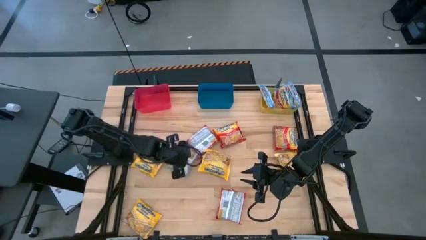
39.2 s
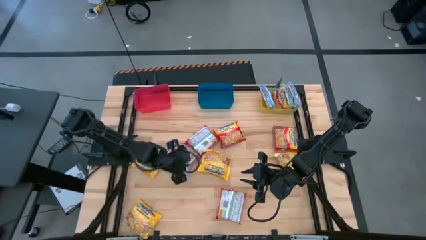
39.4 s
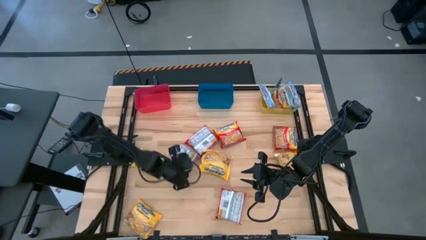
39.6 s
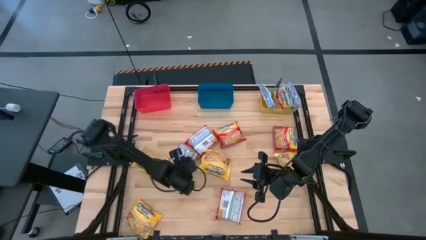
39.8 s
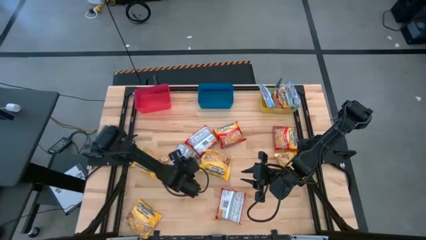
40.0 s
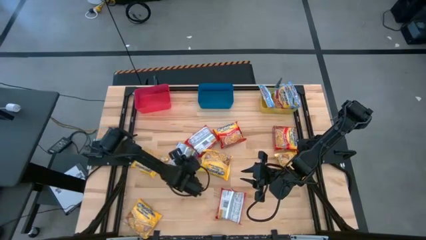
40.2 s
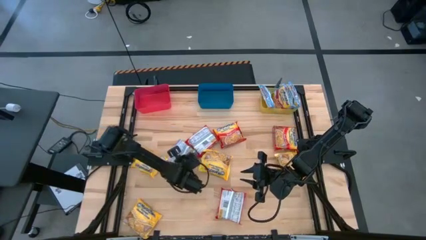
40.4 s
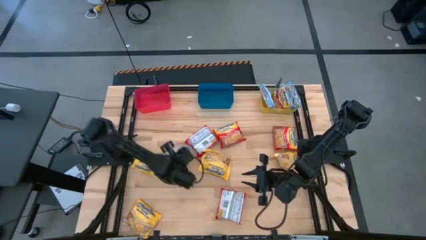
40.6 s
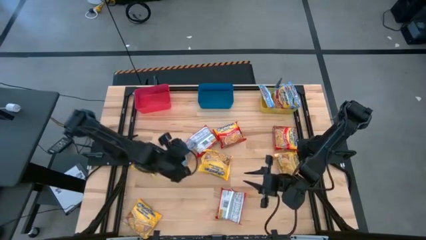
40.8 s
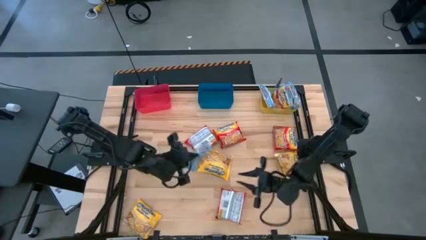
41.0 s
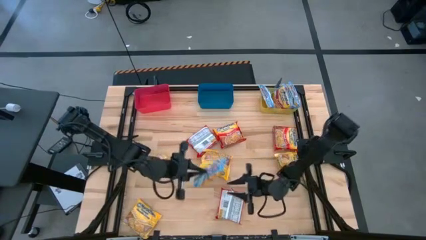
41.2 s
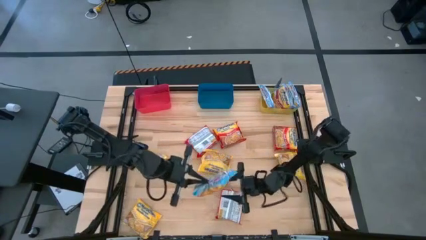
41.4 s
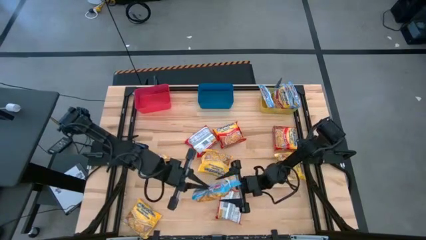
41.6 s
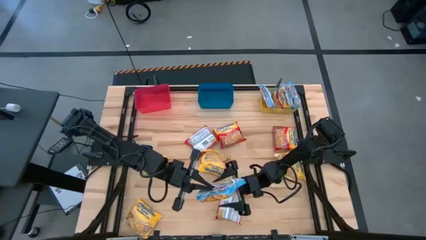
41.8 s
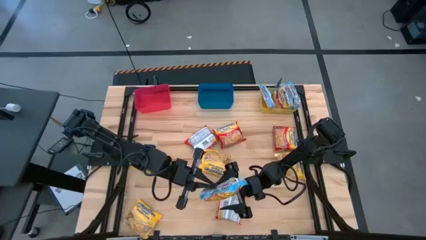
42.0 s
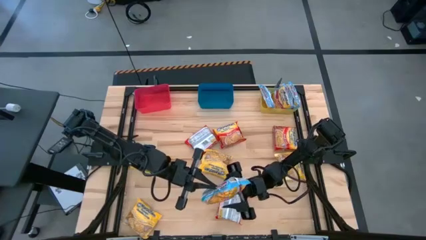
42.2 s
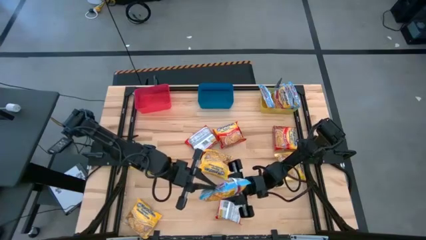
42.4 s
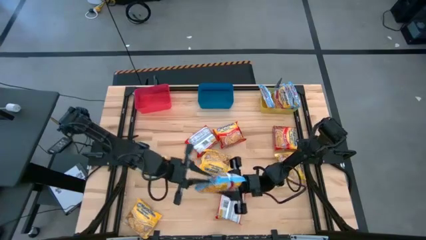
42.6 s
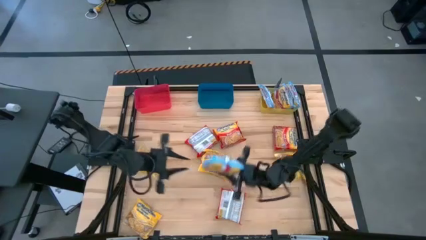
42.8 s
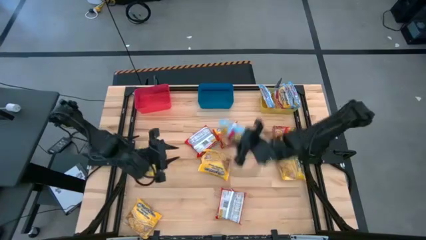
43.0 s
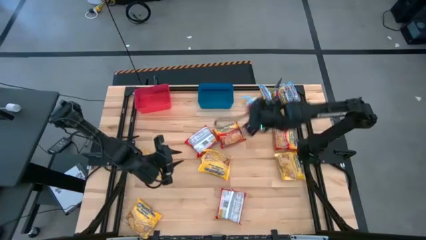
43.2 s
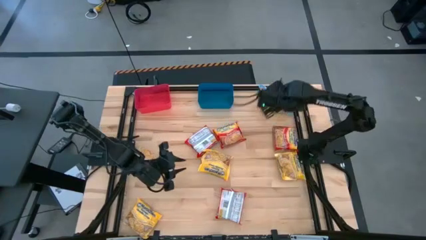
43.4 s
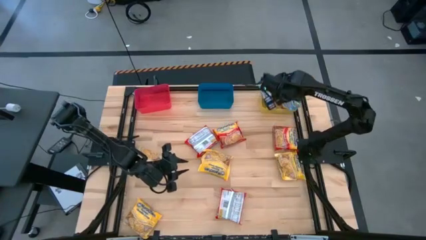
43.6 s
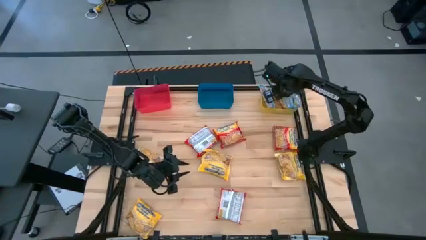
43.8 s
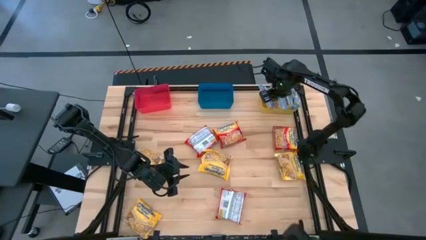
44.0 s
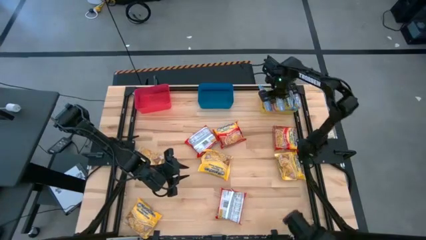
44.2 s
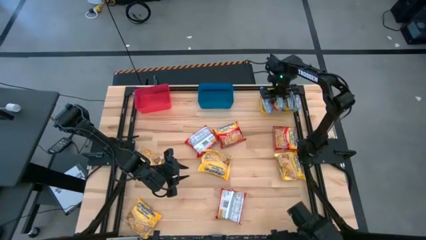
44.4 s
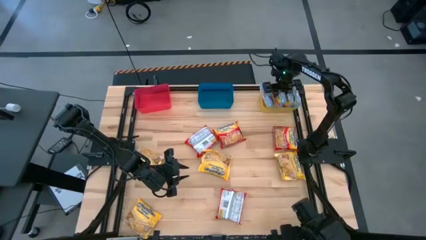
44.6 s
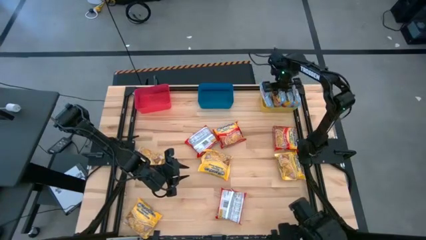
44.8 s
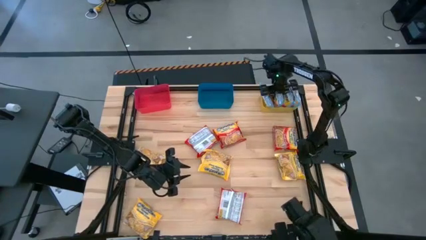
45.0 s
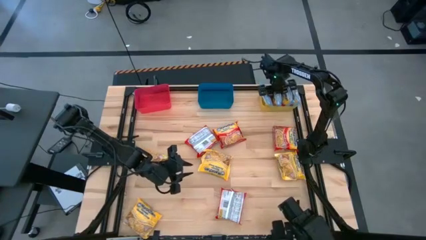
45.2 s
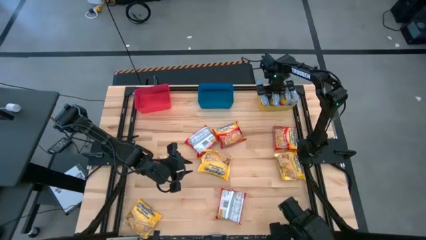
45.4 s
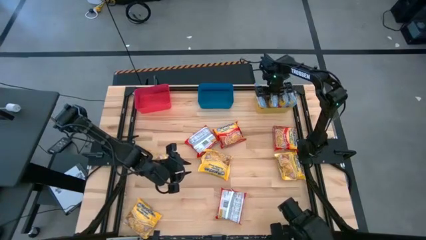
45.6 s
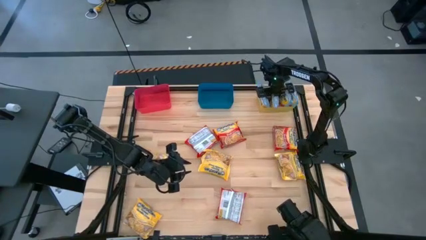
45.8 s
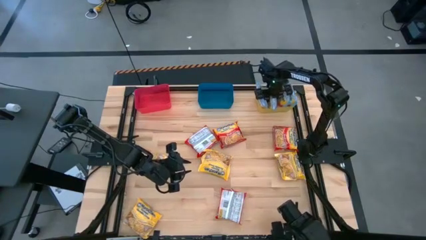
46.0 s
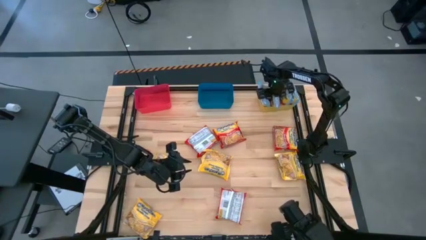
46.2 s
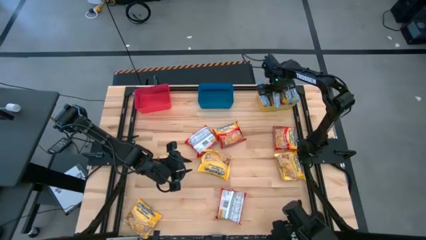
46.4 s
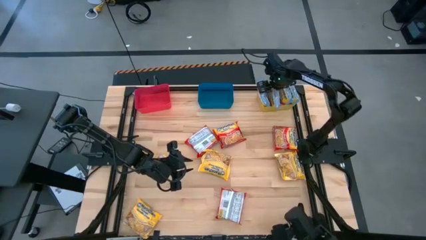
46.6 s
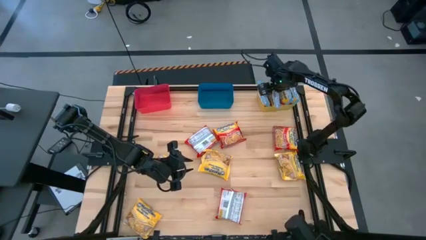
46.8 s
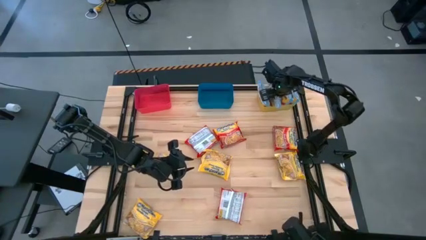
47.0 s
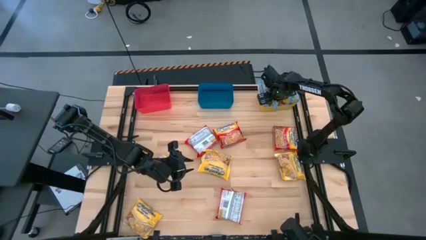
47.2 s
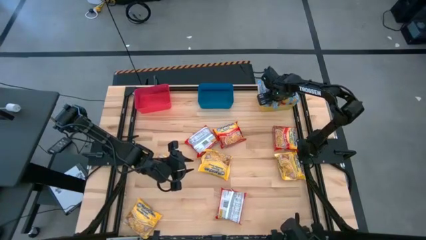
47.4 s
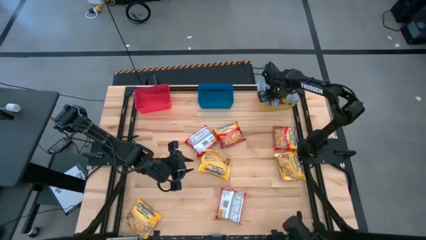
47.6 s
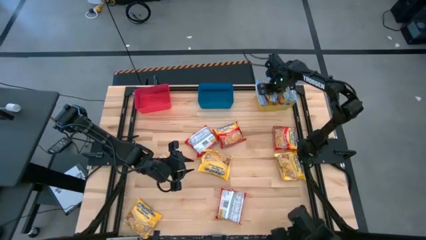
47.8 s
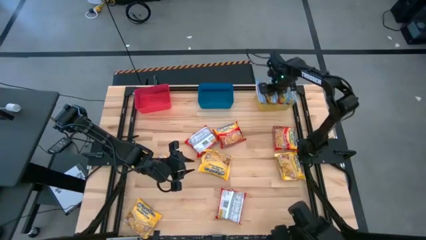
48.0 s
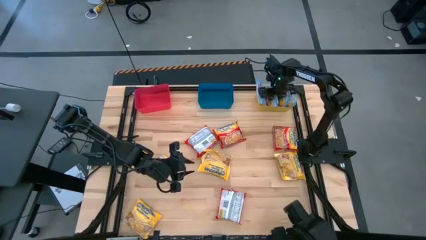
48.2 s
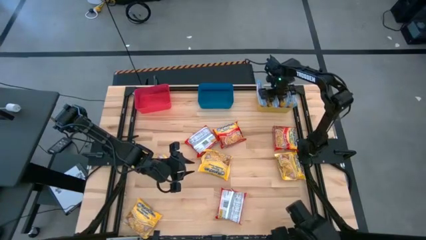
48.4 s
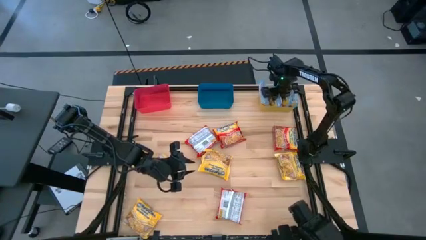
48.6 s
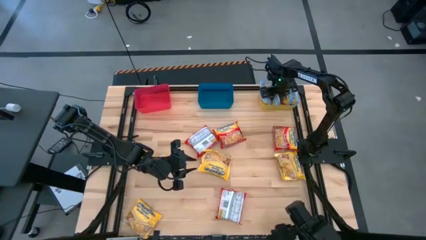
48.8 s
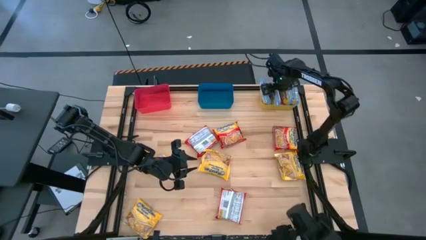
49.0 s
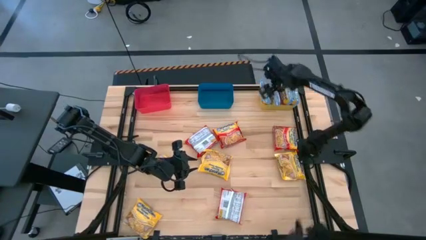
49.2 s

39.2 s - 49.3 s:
Task: Sort Maruchan noodles
Put the blue noodle pack into the yellow bin

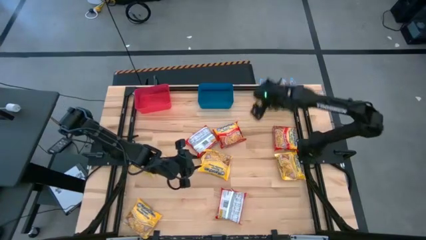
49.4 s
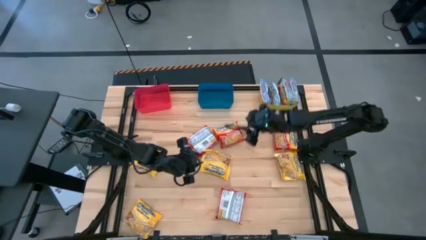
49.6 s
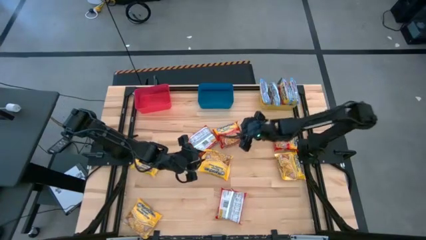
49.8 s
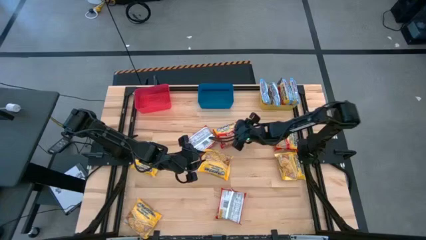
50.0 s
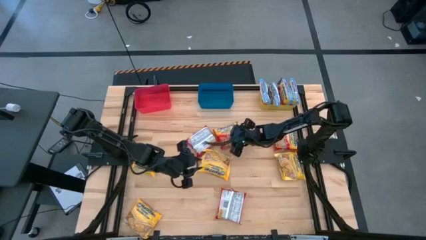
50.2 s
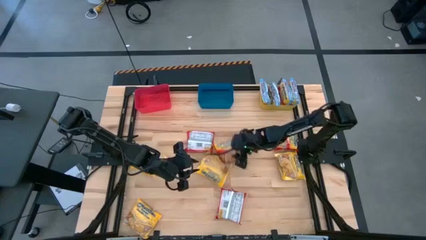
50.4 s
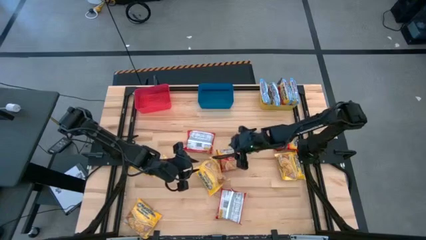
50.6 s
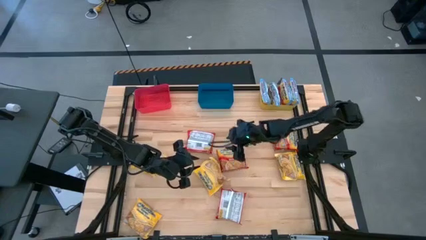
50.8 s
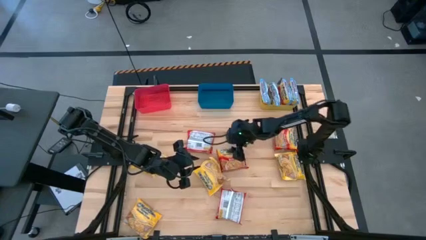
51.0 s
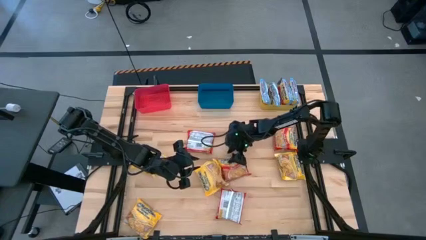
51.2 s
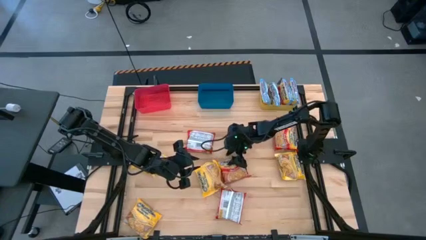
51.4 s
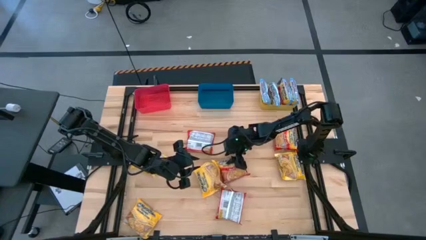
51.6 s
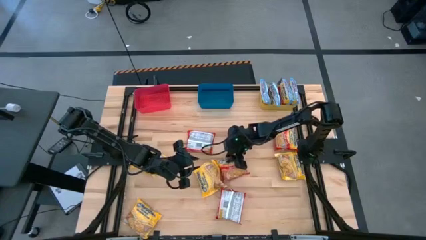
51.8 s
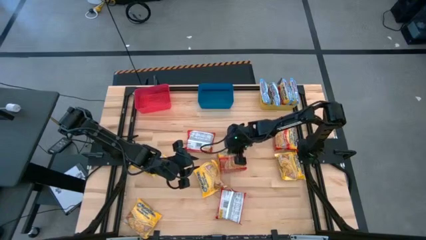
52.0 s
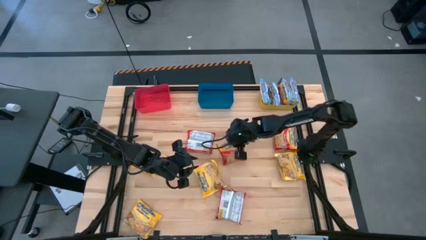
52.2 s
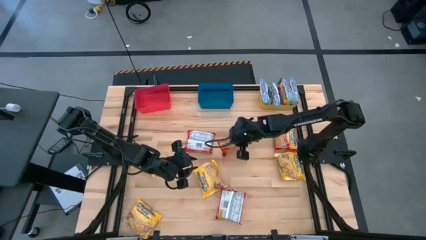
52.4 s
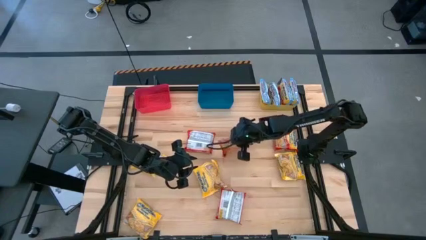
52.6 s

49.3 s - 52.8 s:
Put the noodle pack into the blue bin
